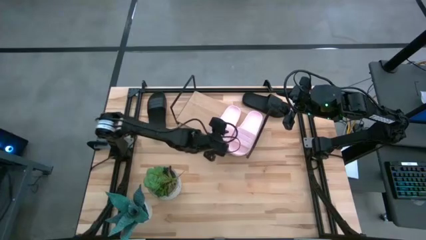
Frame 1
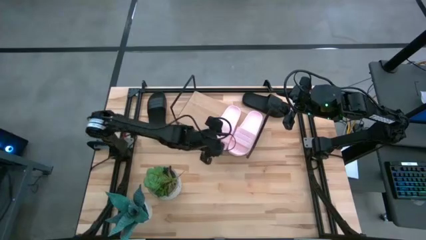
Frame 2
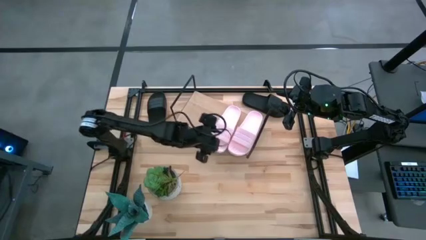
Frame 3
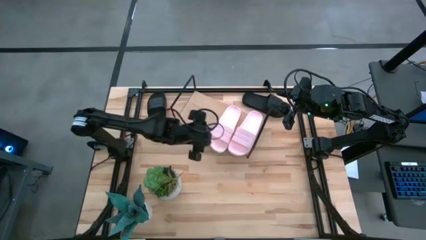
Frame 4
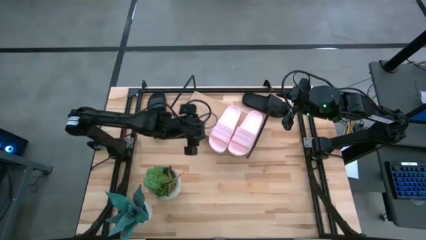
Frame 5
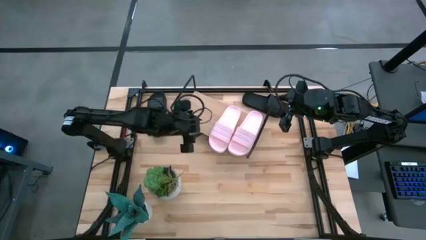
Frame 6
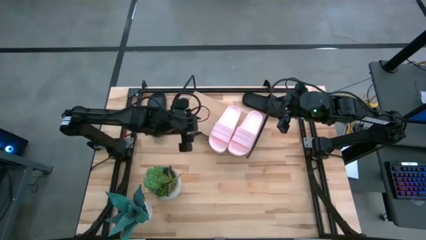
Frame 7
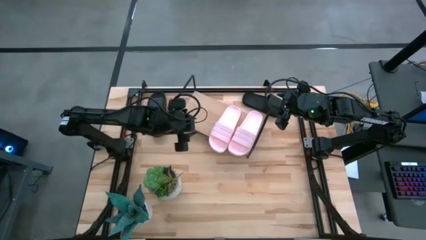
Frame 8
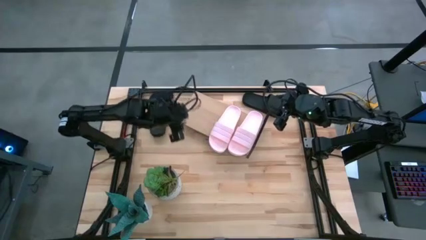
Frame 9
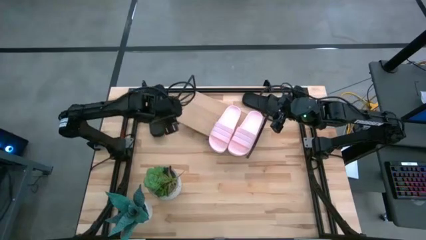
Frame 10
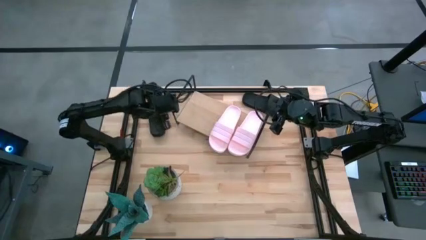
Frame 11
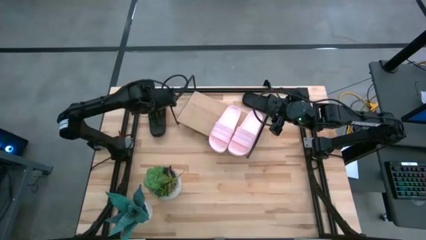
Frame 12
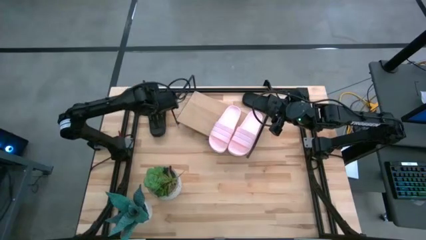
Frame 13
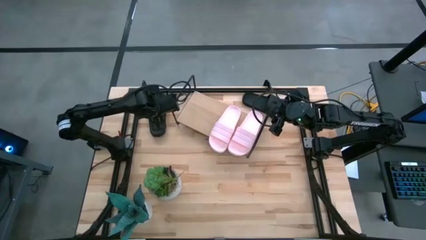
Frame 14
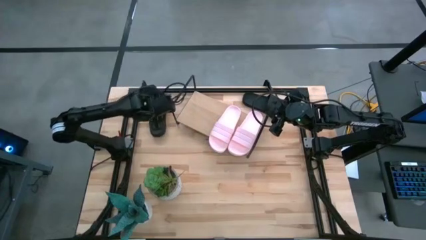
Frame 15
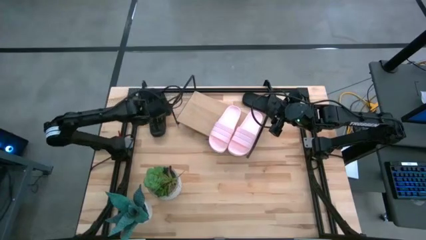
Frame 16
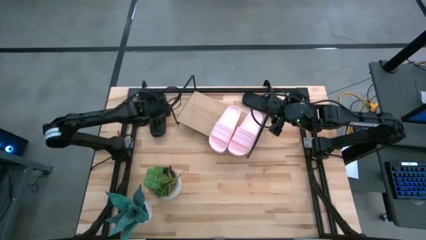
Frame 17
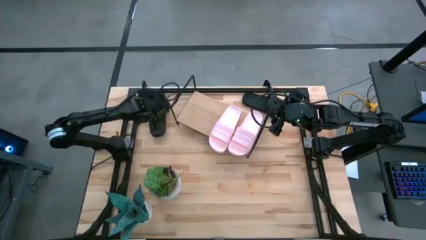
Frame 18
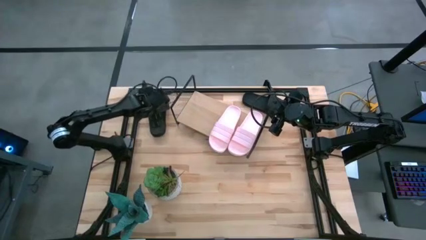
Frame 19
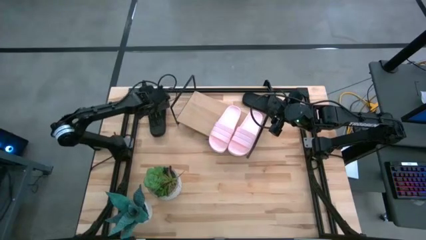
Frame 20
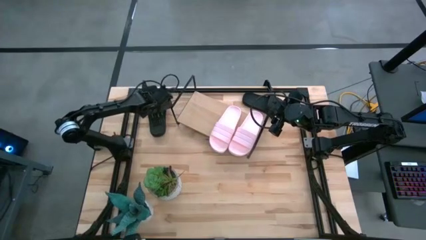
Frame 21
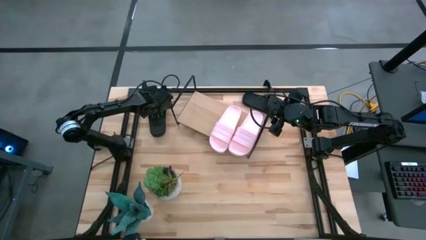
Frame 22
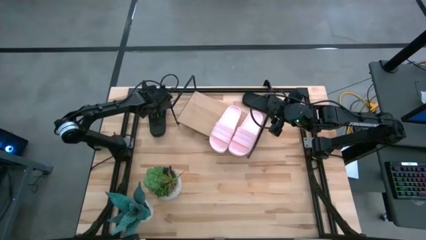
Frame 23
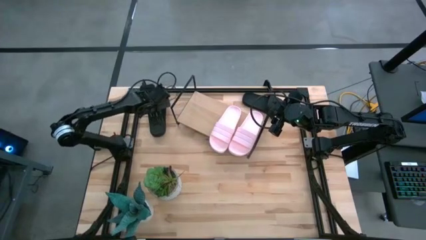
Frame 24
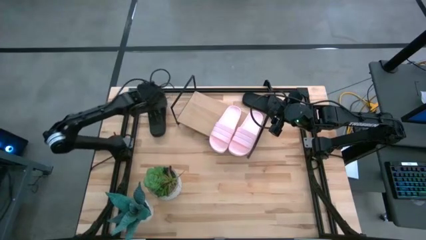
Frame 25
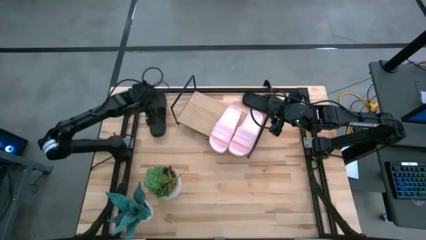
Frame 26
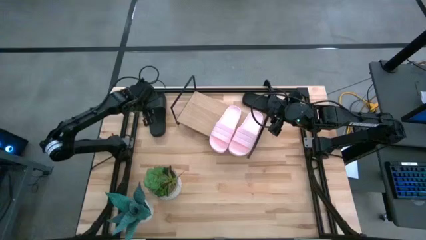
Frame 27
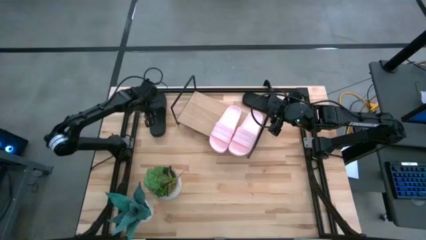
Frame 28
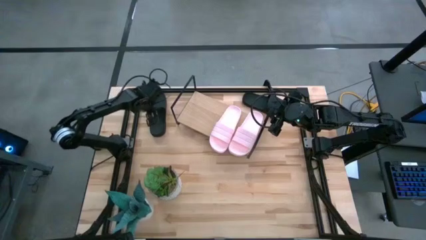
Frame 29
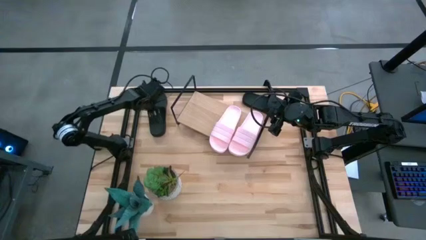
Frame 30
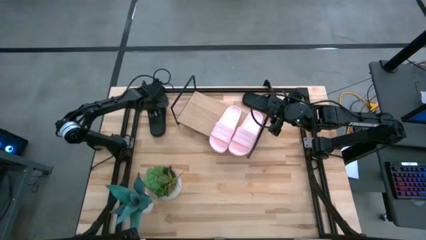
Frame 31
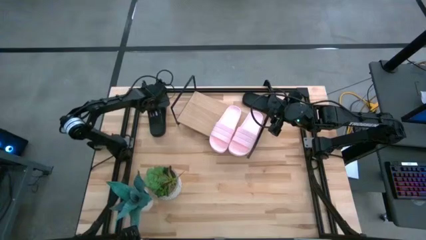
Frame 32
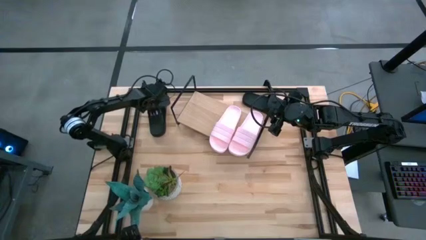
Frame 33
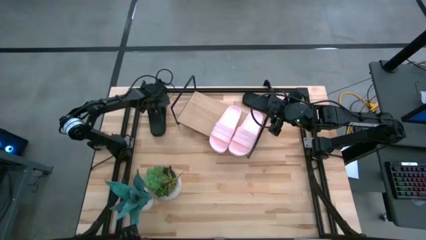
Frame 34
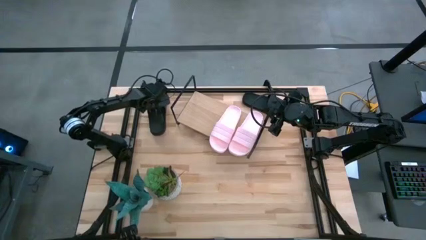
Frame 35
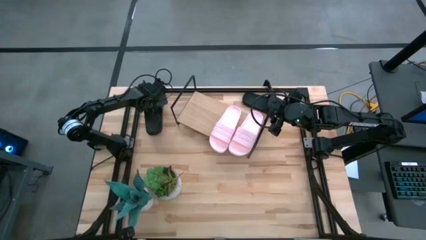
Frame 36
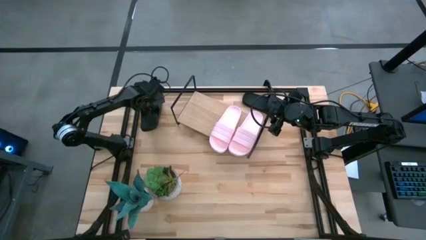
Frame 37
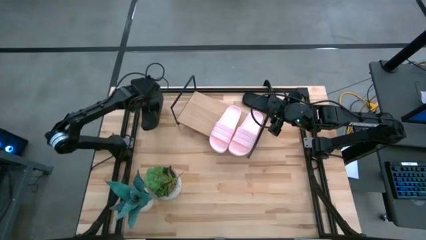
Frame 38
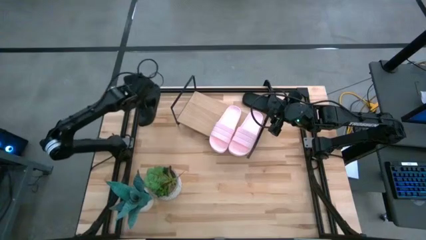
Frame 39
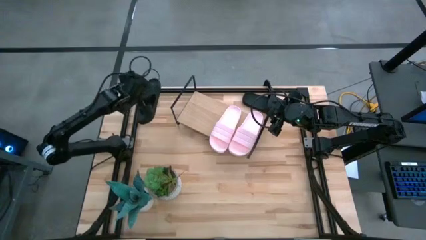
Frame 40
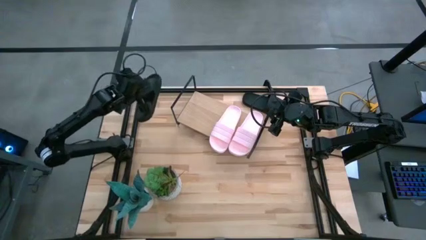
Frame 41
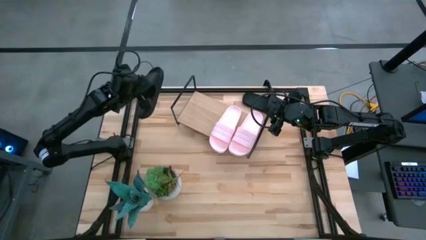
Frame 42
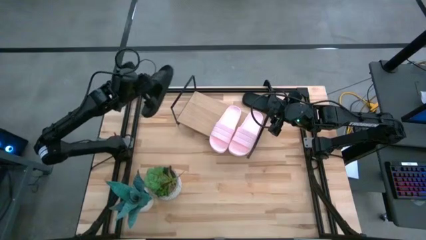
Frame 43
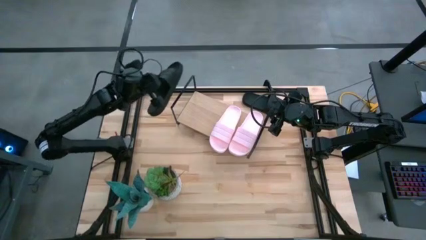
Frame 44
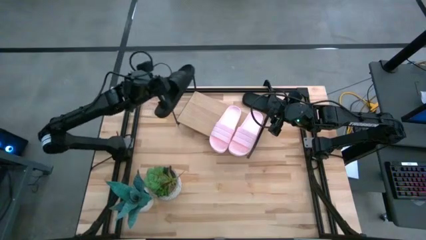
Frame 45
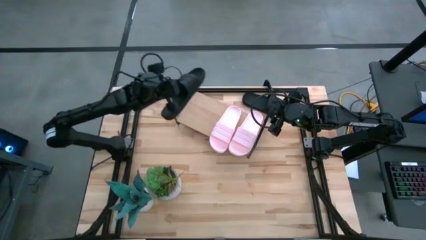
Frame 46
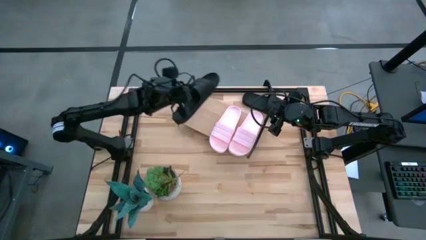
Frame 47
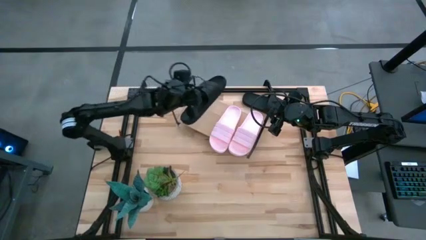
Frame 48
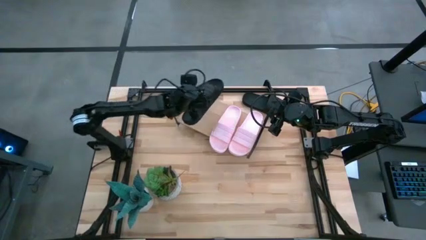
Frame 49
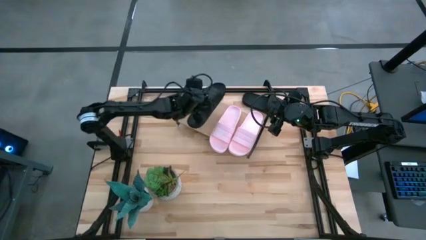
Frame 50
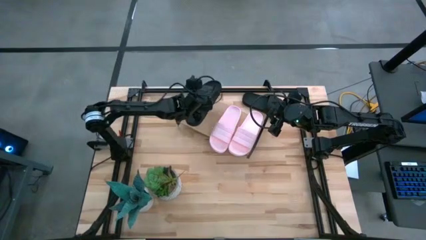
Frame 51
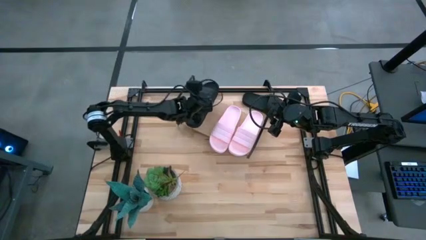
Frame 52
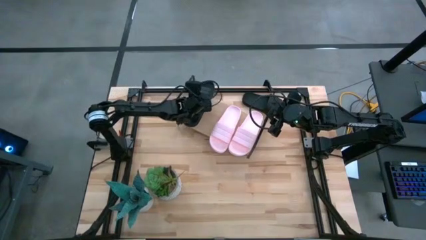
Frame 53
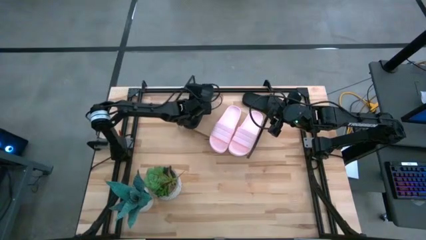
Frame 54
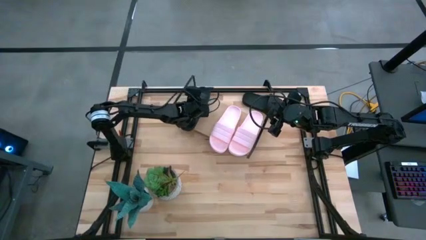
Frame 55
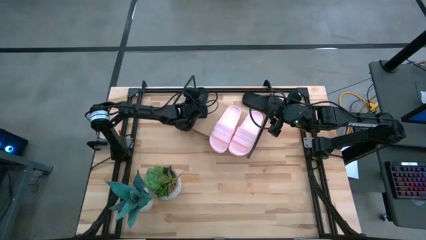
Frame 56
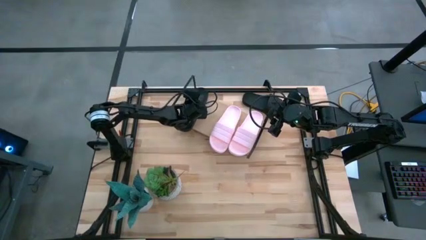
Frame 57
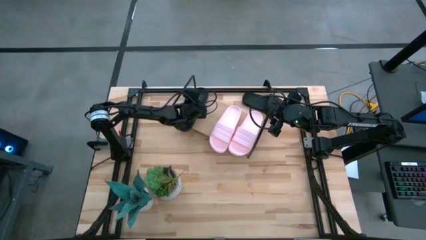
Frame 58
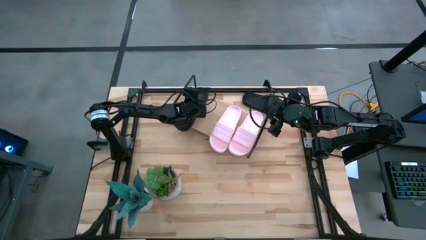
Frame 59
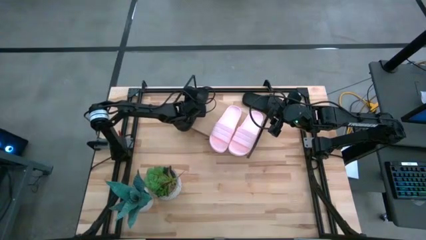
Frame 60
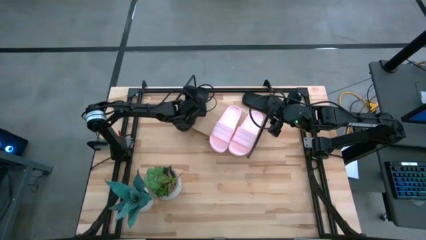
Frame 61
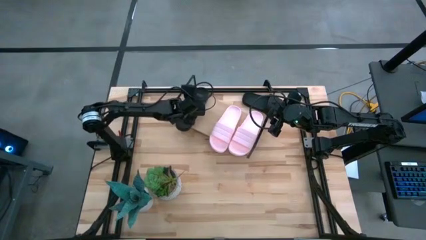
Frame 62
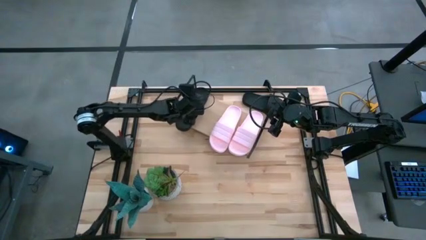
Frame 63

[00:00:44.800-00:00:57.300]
Task: Pick and place slides into the shelf
Put the left black slide on the shelf

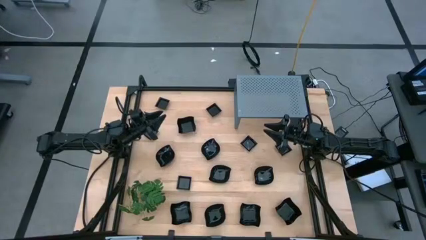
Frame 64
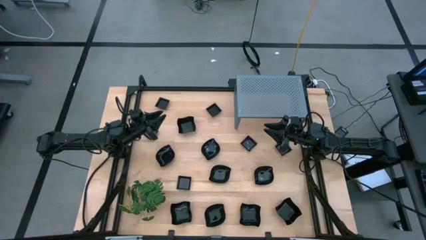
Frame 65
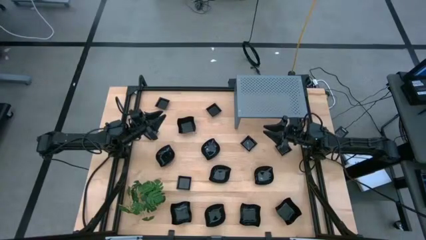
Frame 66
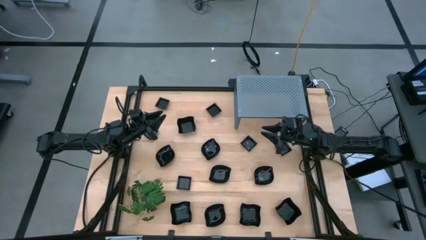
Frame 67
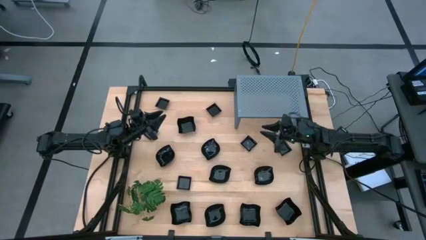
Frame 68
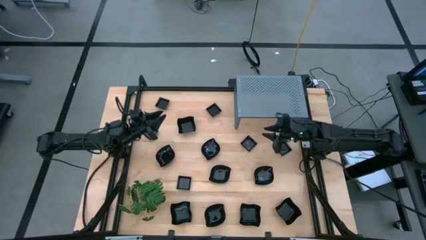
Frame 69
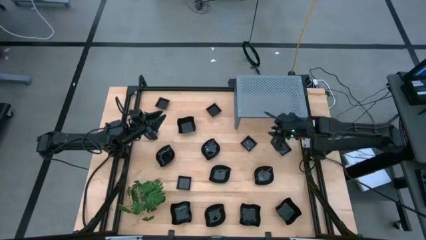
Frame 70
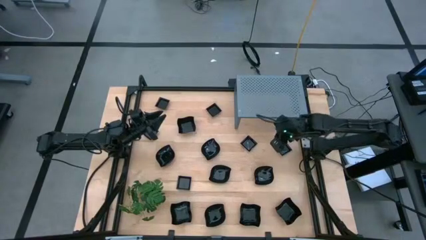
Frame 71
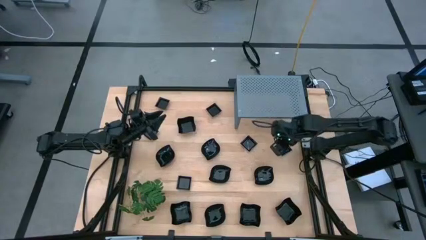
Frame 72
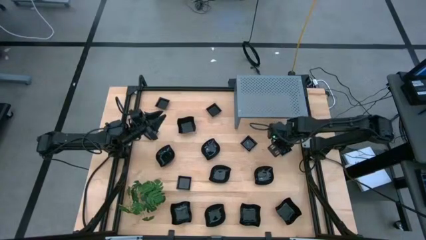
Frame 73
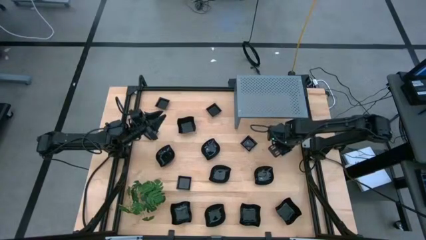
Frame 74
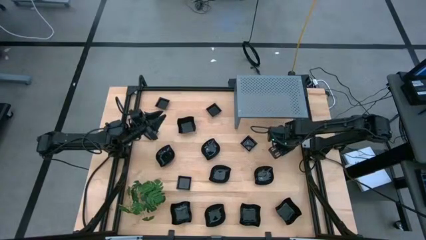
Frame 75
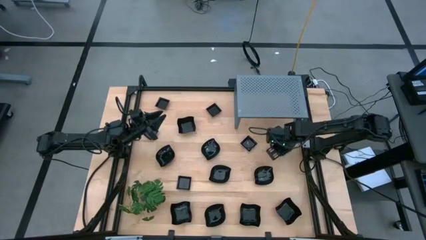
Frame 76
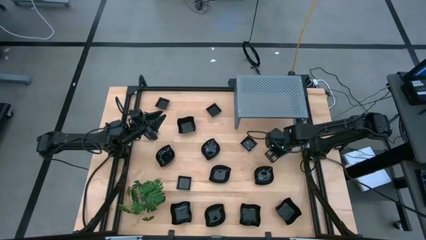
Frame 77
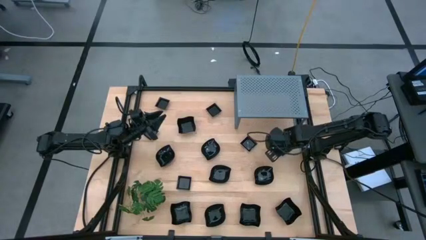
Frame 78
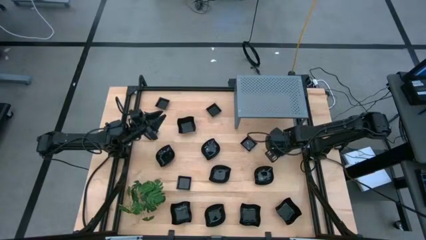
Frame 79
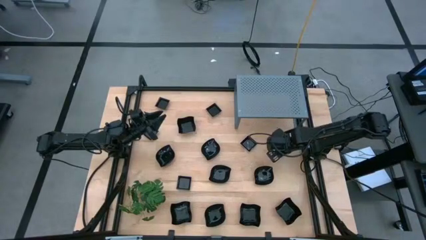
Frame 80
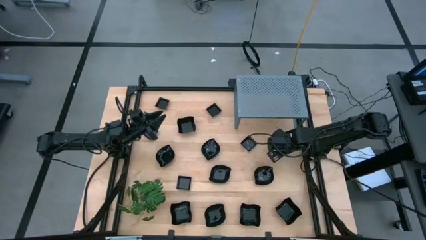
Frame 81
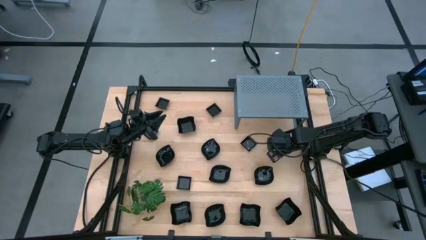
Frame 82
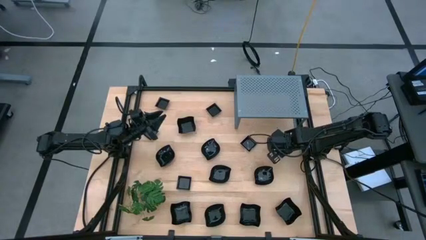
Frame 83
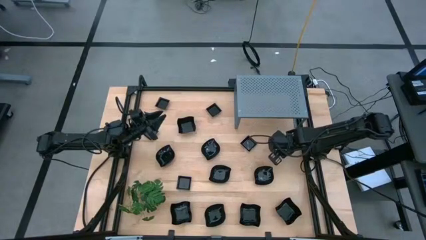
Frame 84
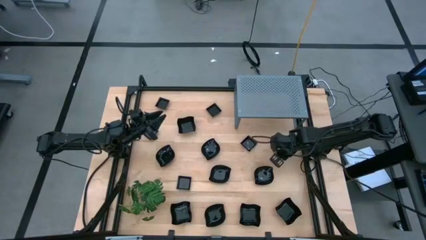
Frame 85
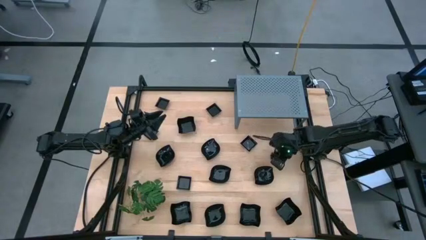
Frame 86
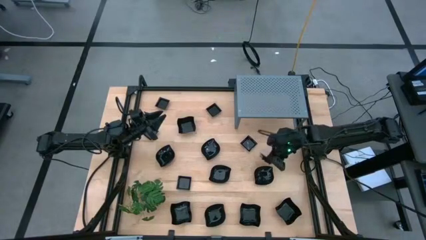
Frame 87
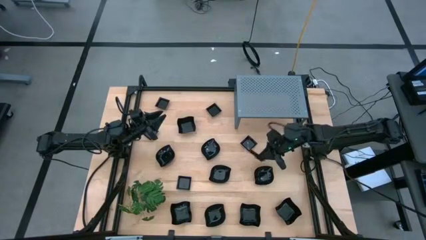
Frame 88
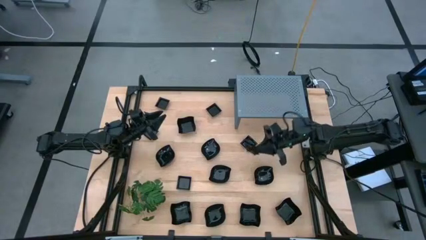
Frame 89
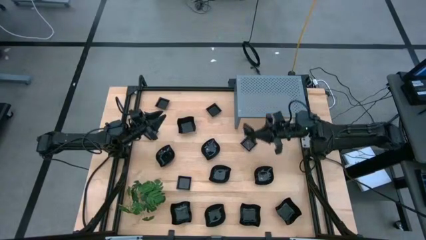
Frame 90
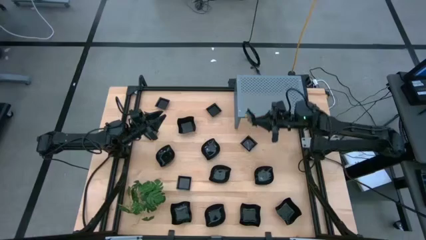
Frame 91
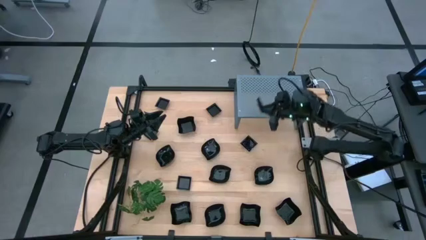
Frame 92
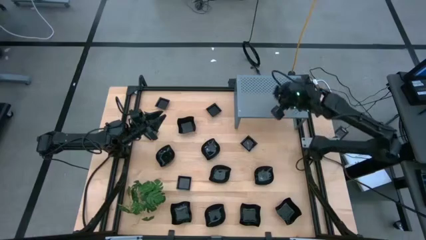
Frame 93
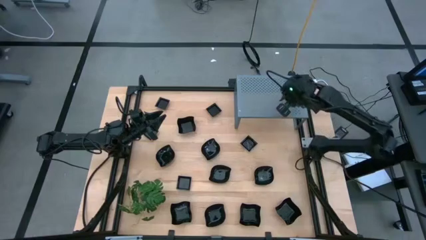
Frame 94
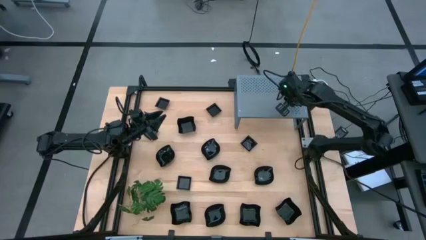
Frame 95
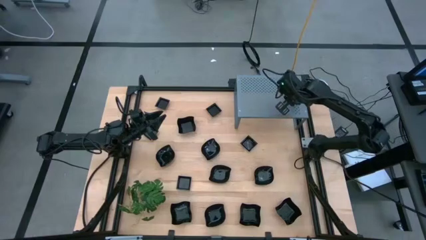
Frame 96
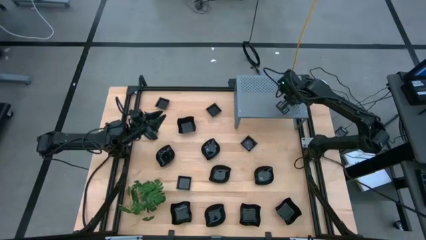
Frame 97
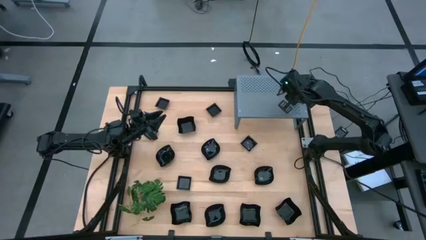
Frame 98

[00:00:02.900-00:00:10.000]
Task: Pick & Place Mini shaped plates
Put the black square plate on the shelf
